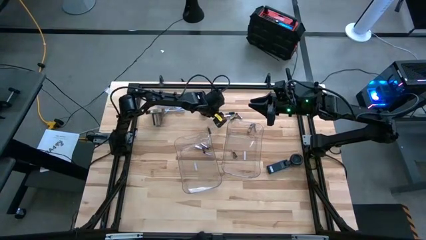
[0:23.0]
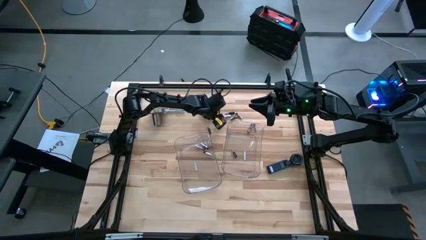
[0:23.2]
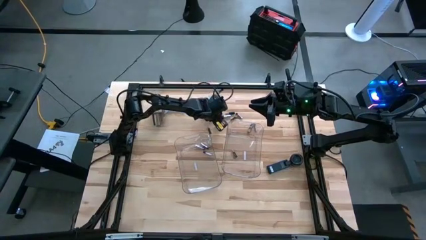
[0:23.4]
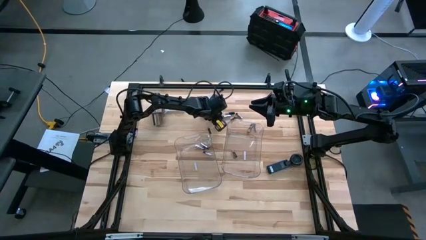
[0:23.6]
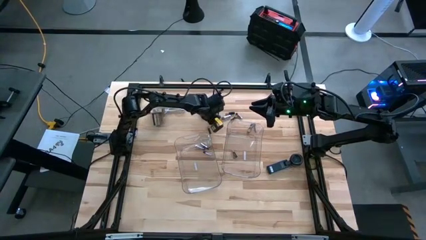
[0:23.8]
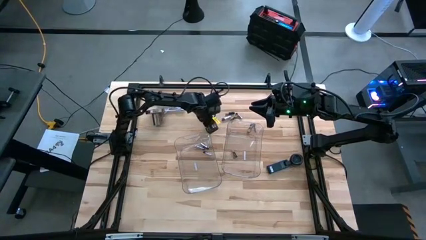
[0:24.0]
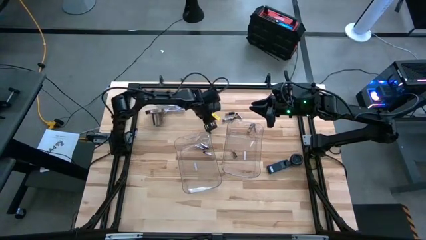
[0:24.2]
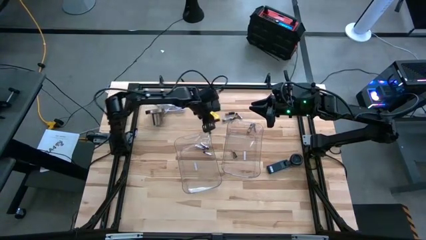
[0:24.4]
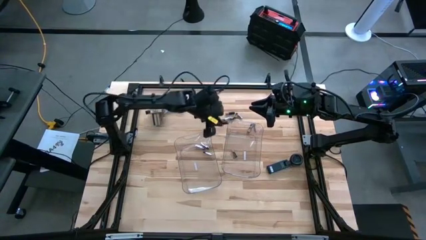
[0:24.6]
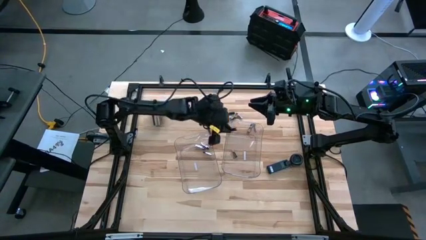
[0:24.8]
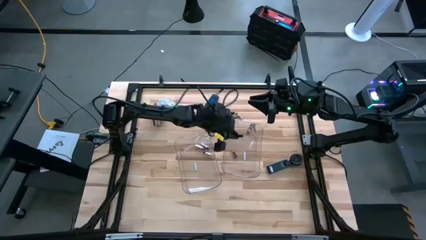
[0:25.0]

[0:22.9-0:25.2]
Task: Sort batteries
Put the black battery into the right transparent bin

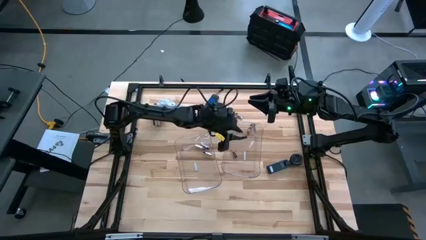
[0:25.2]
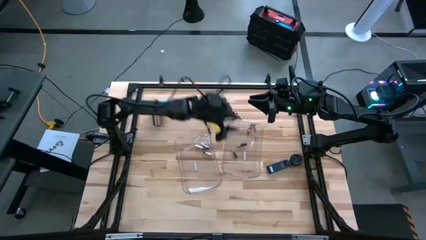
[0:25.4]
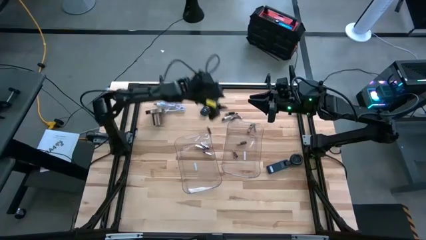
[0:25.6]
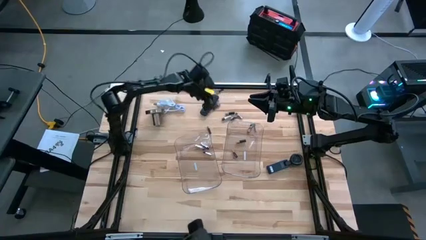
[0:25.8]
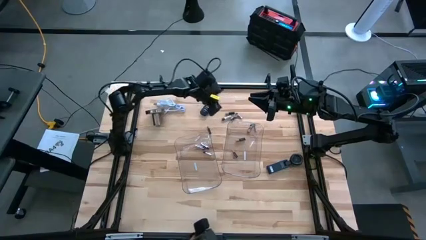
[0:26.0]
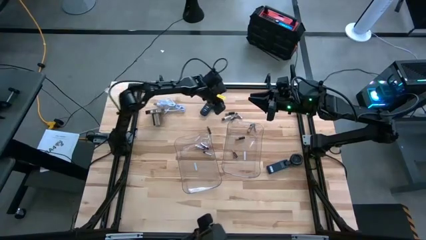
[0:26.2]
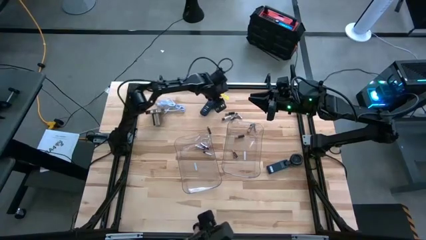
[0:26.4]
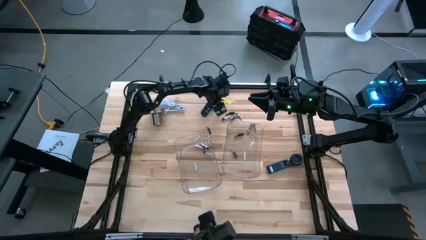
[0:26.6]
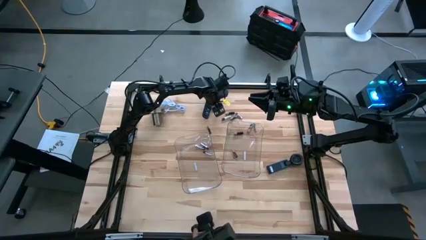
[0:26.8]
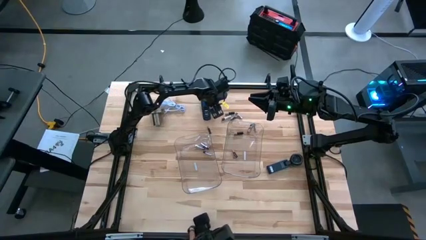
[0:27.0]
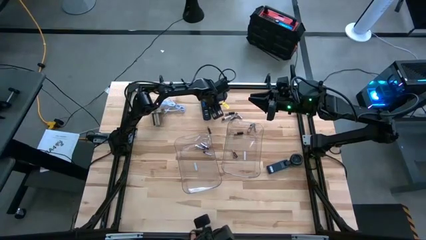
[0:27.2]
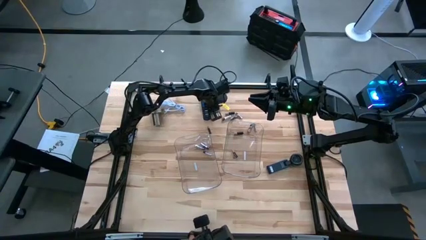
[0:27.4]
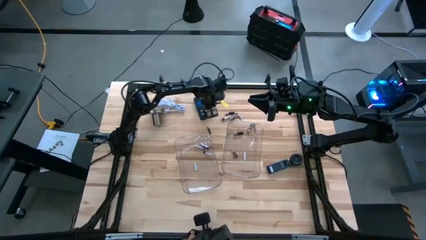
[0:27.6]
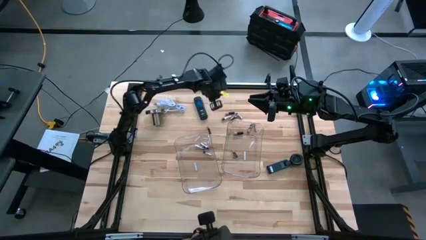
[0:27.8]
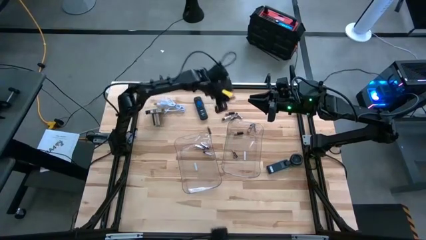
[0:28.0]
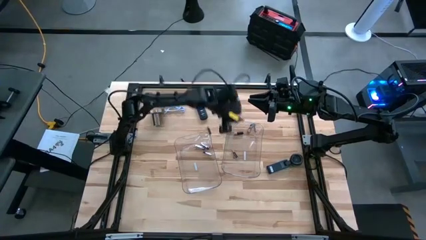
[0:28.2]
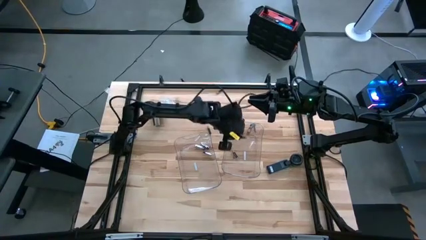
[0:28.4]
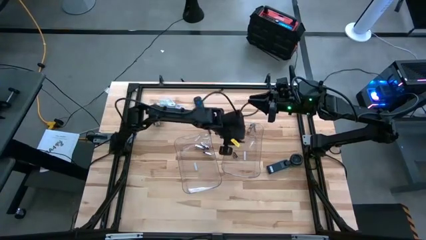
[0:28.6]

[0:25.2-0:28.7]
Put the black battery into the right transparent bin

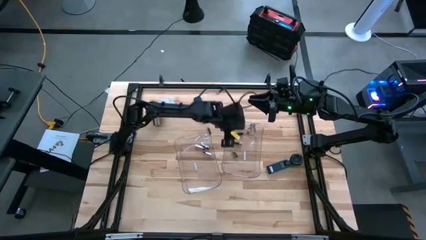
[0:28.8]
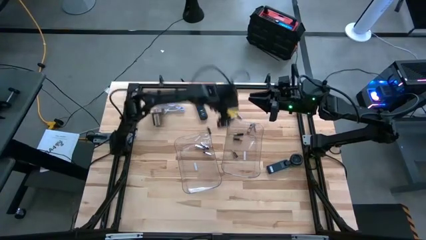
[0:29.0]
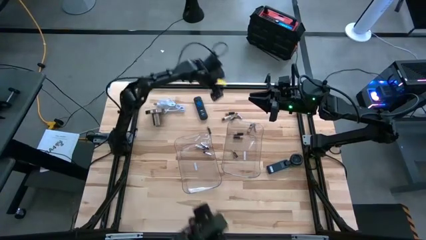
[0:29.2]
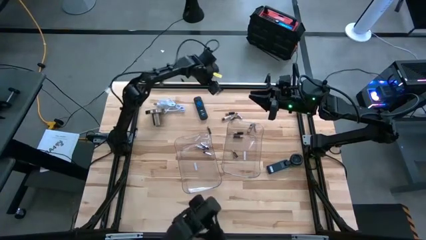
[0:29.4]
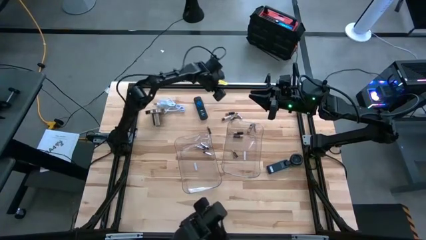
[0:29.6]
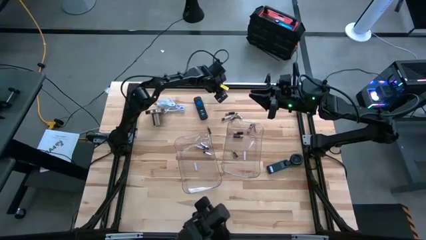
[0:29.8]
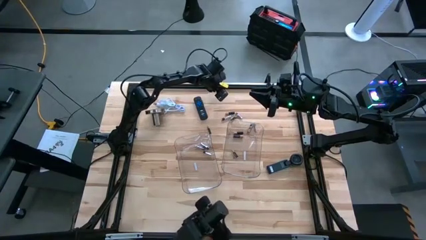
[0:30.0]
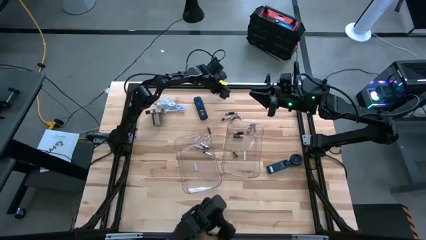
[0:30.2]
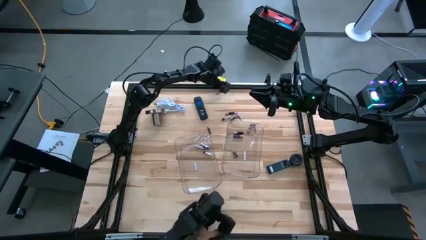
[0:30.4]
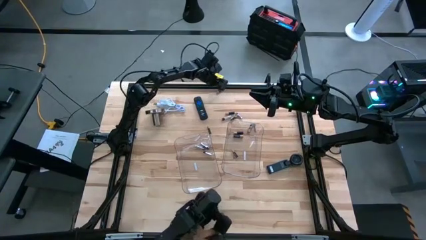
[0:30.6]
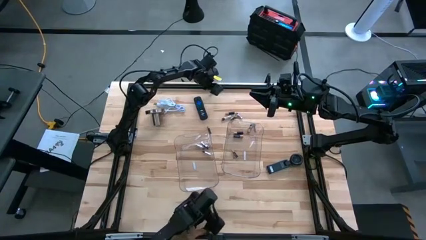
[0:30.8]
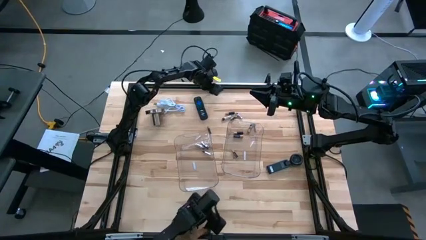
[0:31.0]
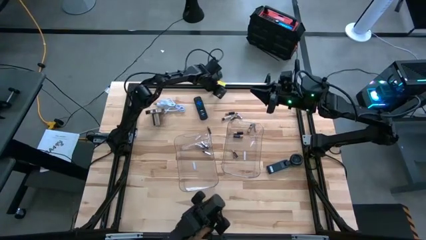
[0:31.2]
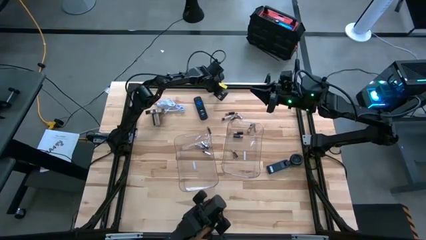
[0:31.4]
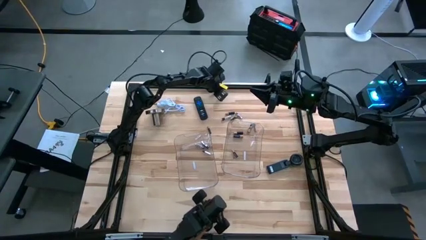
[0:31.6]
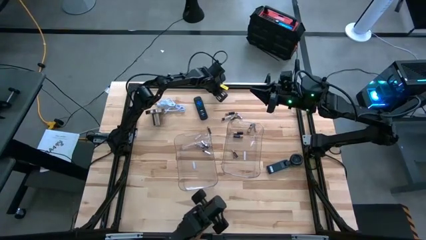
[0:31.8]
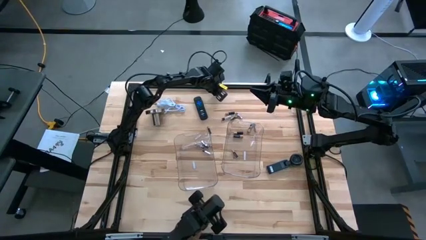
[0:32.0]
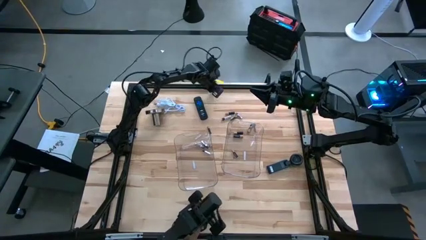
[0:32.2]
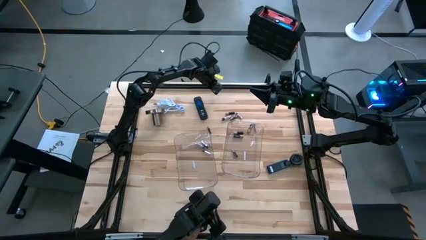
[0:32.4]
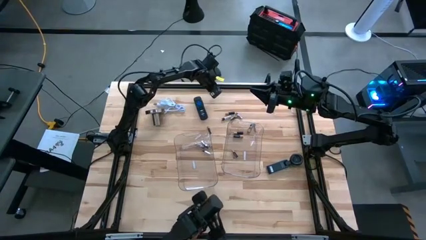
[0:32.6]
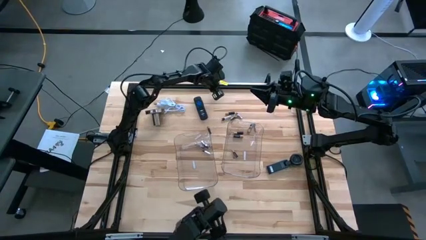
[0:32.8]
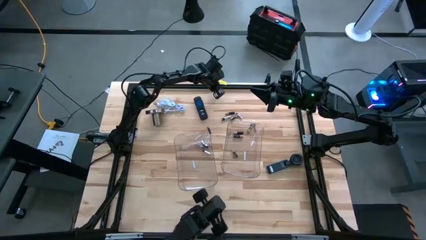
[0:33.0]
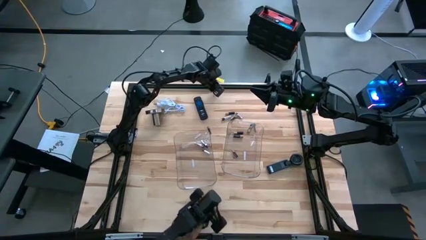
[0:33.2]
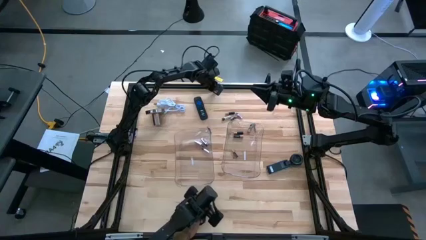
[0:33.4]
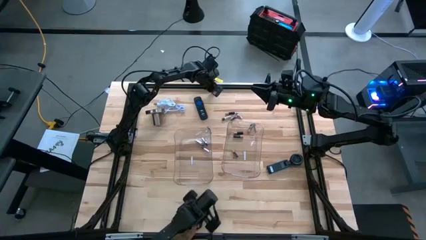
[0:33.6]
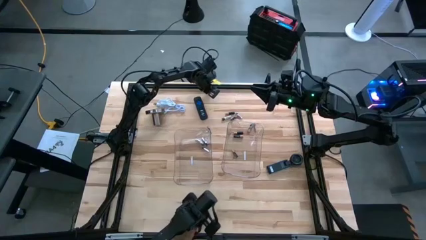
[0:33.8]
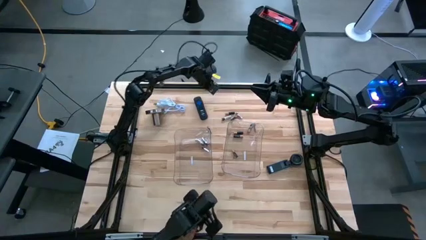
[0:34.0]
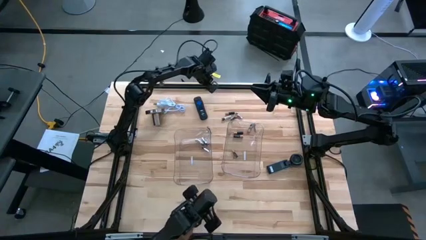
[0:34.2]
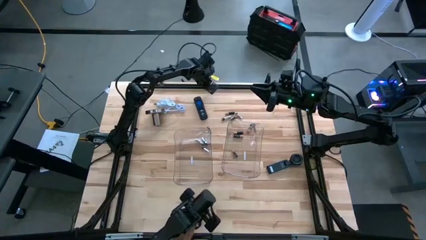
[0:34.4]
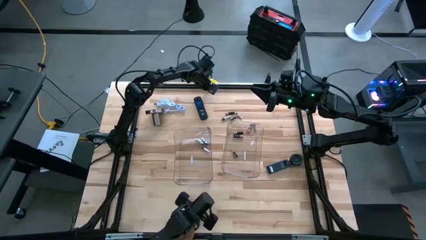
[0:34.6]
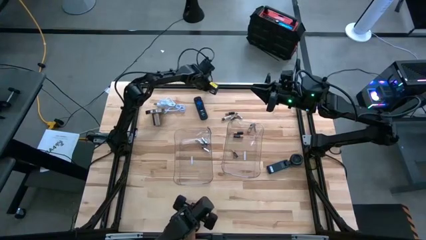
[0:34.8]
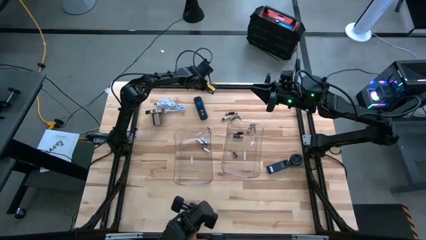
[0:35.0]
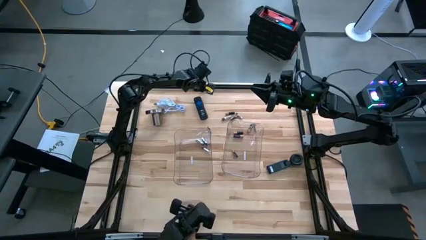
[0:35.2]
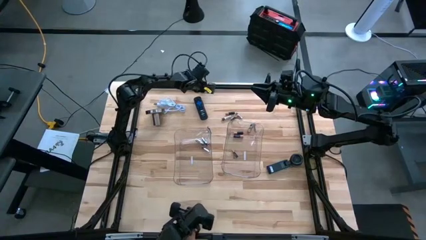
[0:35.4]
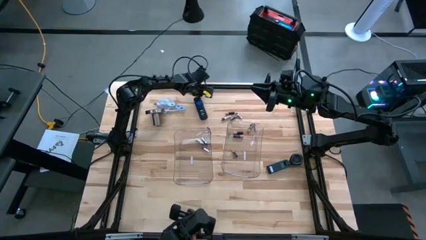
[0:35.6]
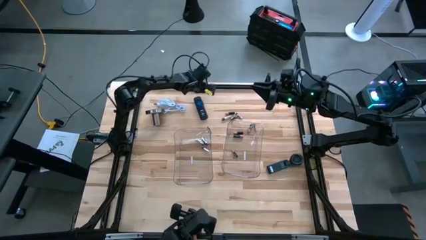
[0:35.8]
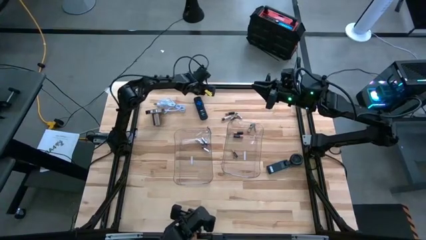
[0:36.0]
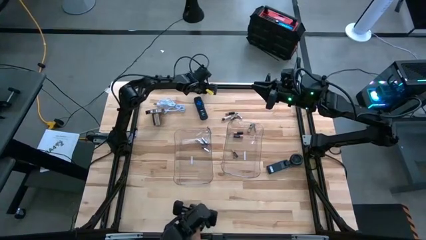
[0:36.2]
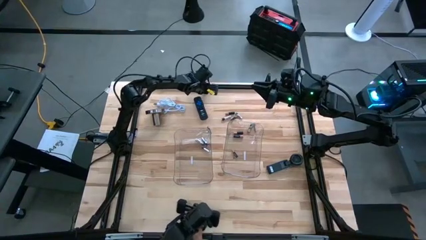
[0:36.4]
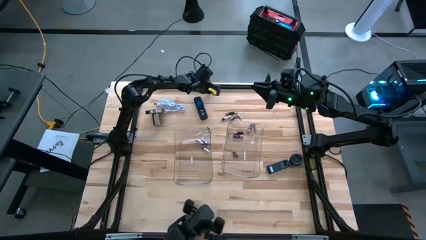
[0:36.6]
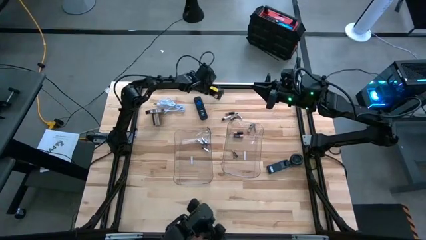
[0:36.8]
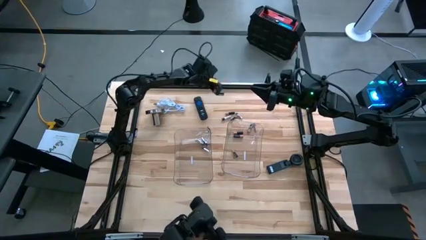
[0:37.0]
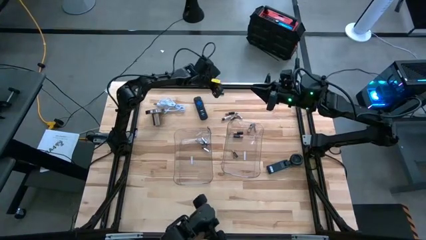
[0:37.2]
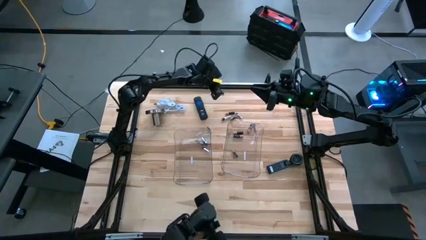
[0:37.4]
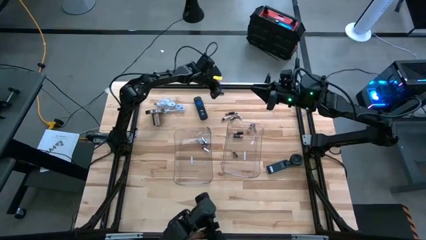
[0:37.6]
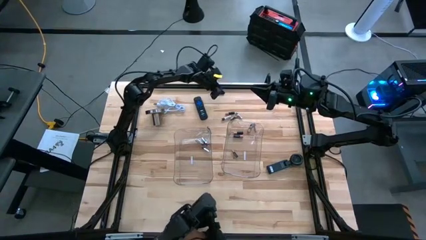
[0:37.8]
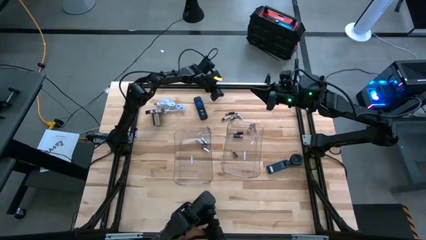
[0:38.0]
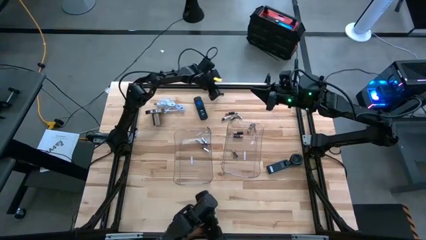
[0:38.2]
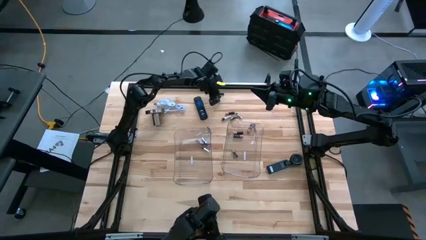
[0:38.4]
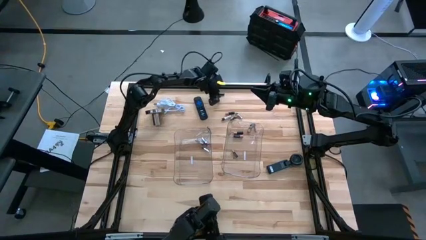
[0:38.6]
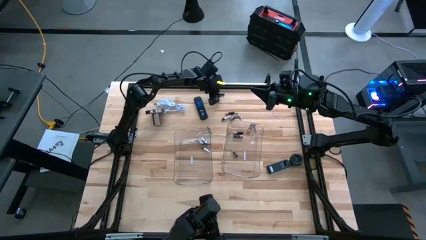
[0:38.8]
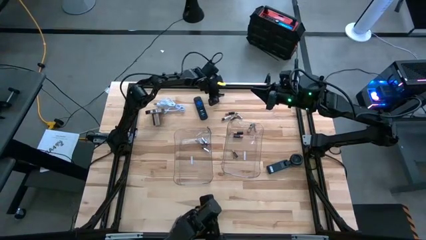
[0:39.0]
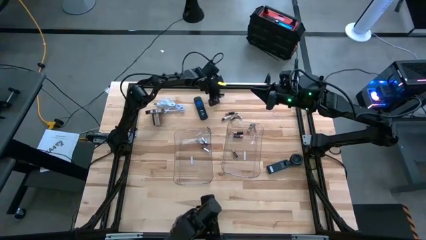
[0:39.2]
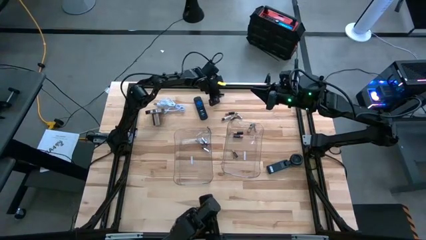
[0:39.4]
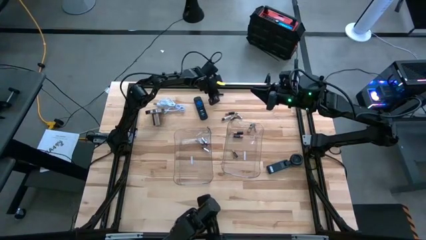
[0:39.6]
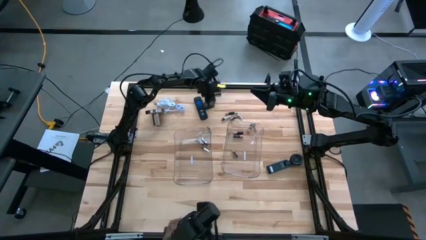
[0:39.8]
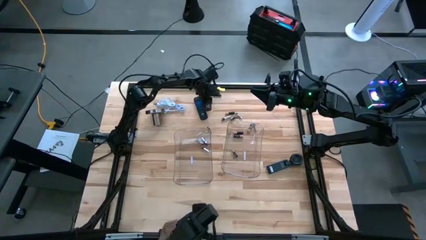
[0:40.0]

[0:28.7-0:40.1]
Put the black battery into the right transparent bin
